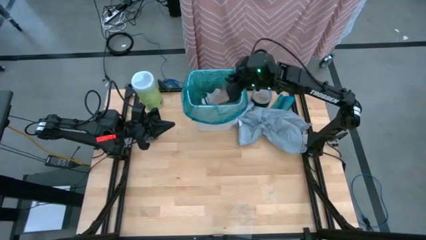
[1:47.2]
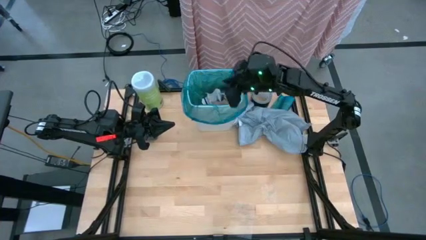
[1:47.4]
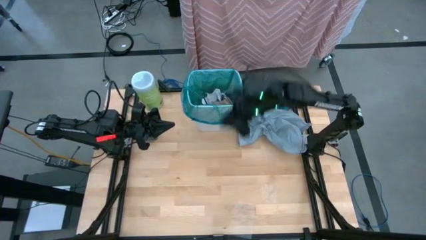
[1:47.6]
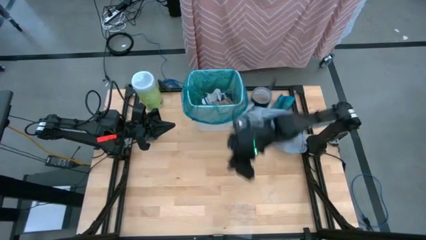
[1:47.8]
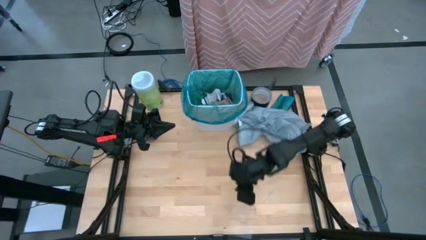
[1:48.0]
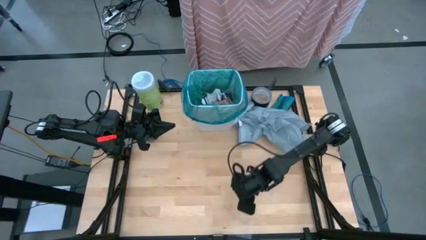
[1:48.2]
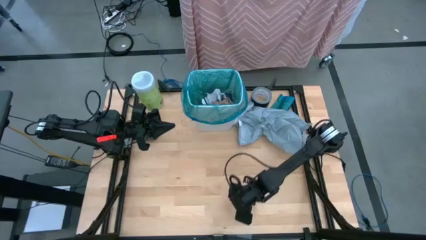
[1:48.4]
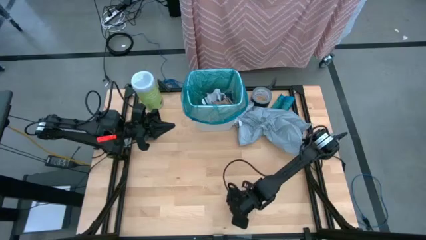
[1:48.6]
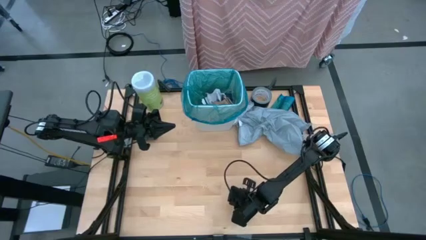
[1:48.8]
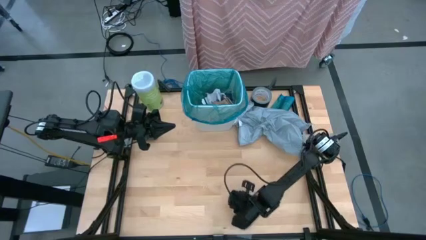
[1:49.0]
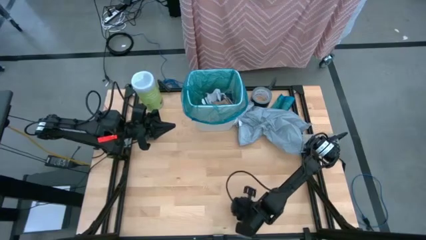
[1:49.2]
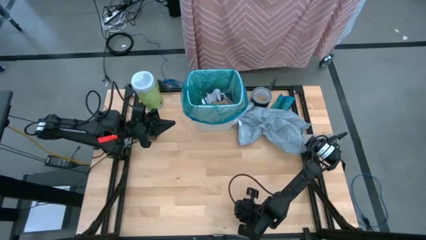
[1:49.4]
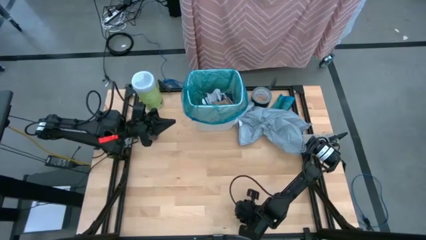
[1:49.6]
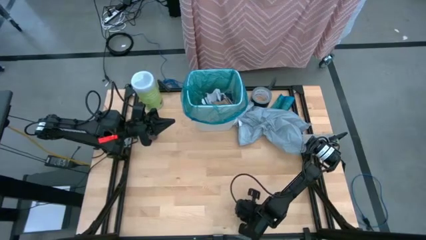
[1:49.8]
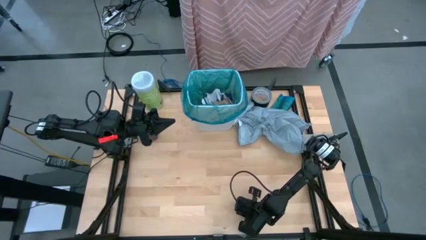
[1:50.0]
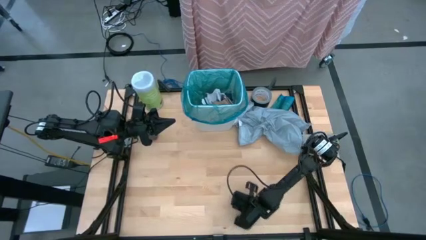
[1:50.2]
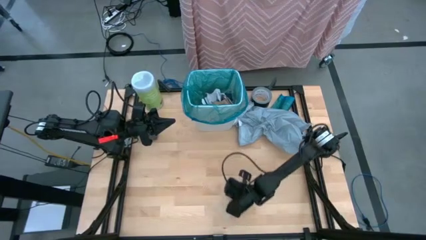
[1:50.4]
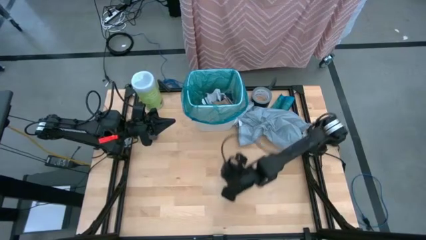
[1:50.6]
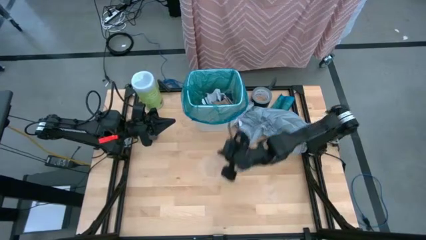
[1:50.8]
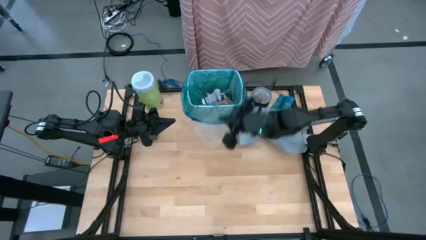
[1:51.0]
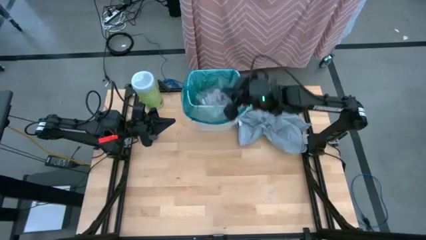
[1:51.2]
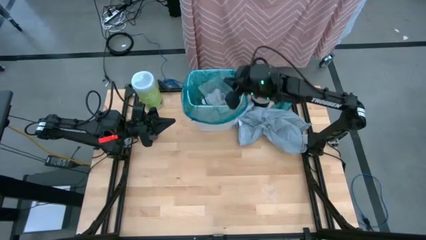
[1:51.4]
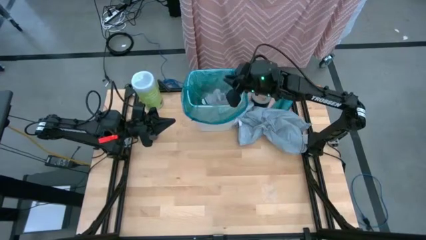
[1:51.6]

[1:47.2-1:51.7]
Task: place trash/remove bag and relplace
Put the transparent plastic material into the trash bin

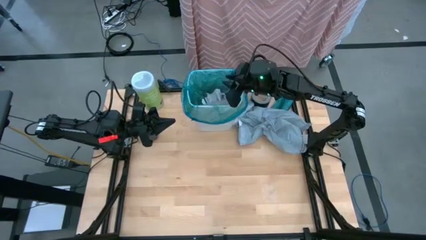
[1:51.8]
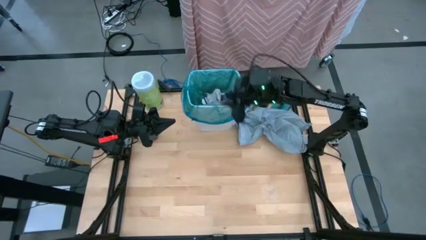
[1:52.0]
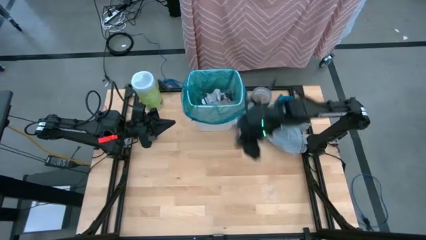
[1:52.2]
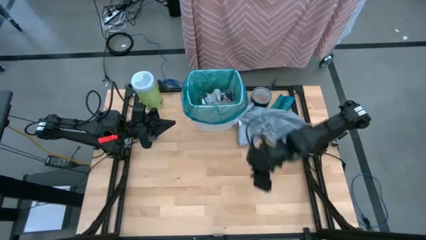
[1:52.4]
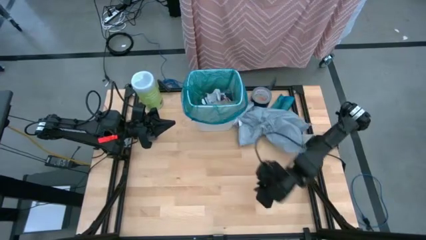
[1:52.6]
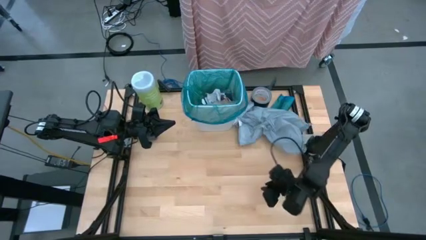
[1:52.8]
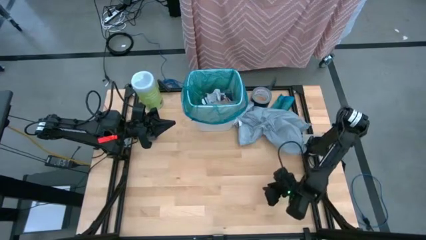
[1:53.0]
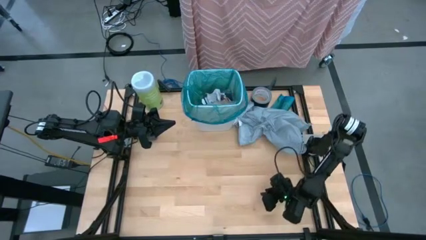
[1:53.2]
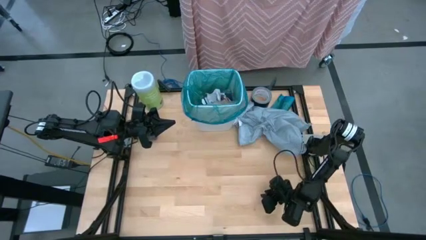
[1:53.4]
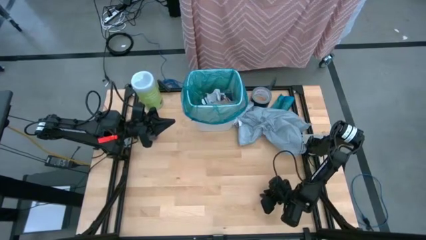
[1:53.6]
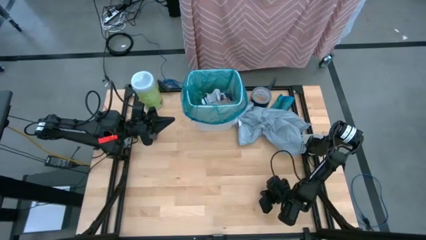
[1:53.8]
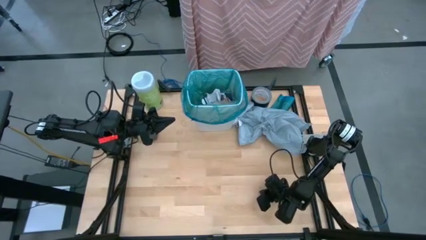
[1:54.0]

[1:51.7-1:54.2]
Put the transparent plastic material into the trash bin

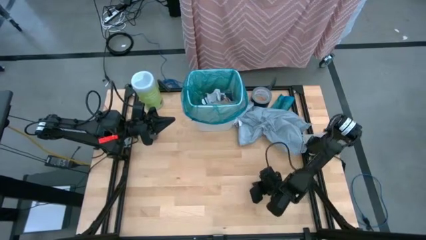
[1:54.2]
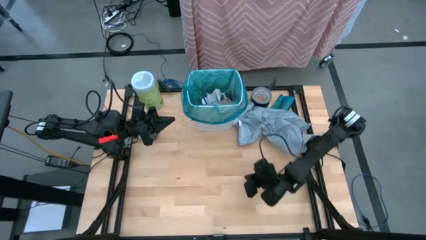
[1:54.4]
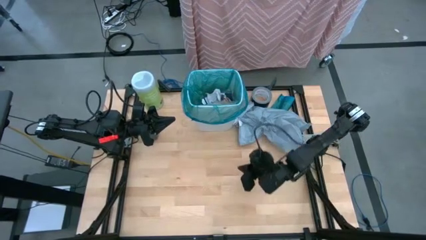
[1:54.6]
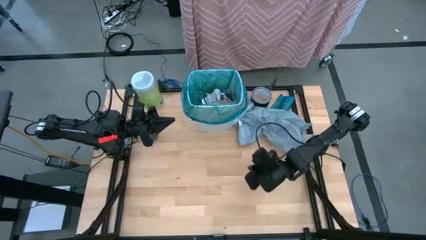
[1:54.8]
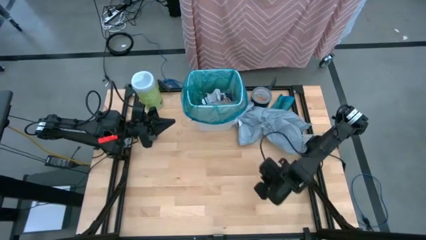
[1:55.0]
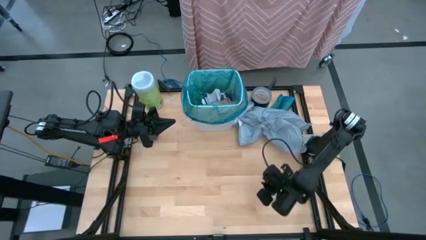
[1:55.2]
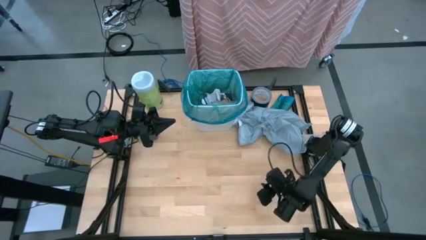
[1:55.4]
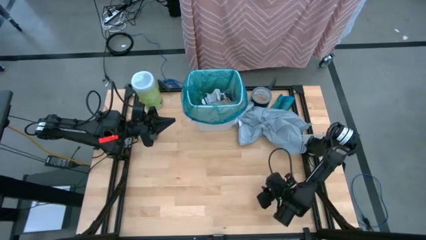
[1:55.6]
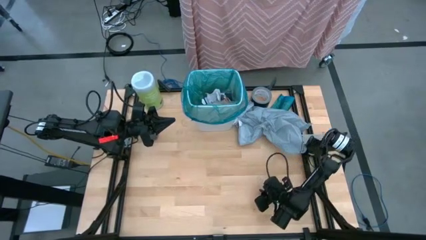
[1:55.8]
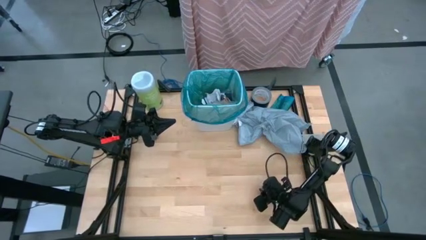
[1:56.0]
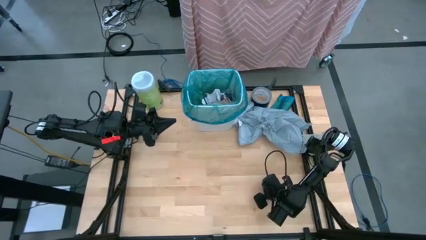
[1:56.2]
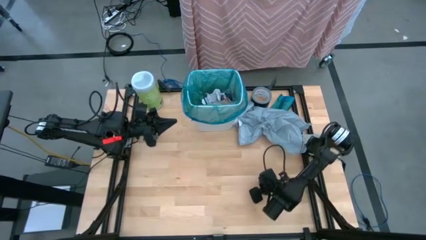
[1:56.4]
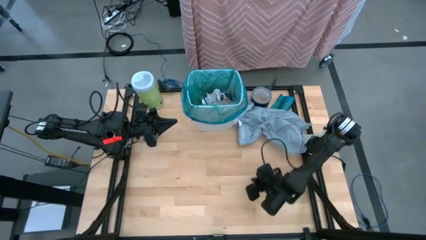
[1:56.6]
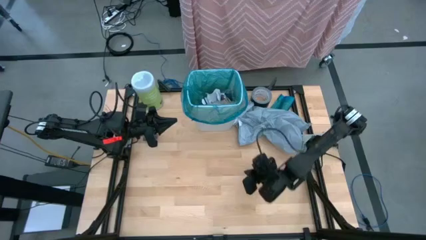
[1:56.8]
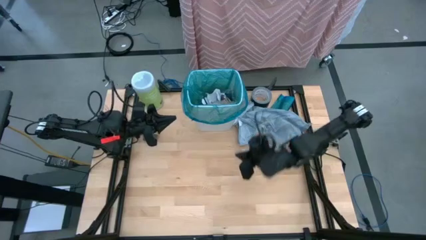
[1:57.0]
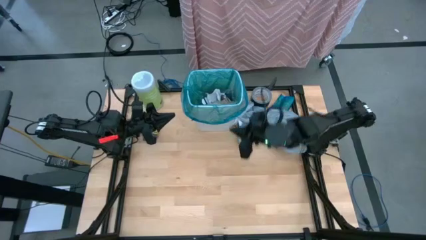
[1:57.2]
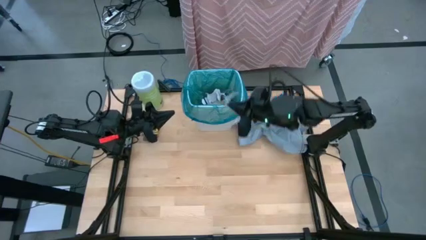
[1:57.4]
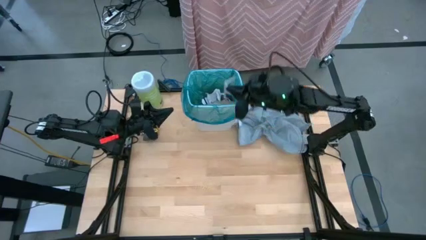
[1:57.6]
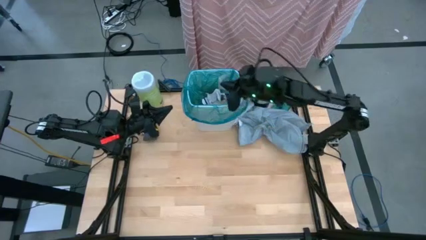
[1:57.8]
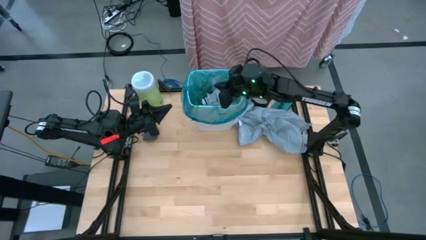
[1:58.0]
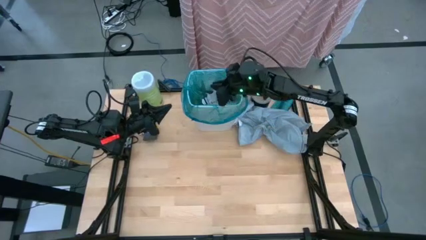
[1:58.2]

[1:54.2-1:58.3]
Put the transparent plastic material into the trash bin

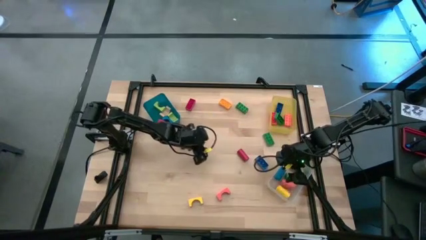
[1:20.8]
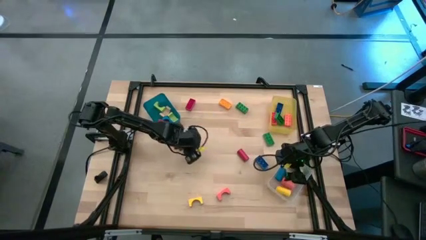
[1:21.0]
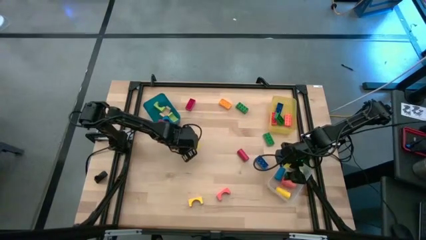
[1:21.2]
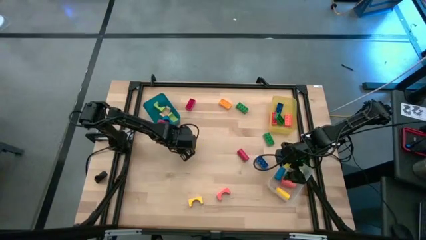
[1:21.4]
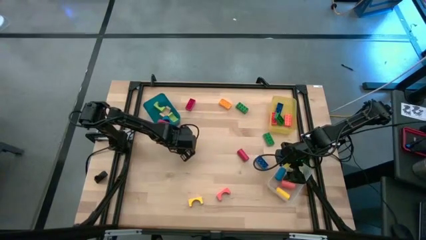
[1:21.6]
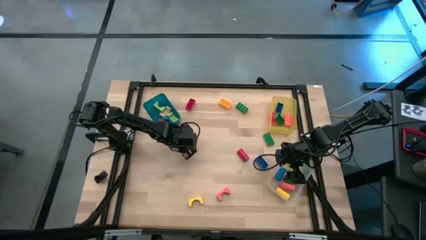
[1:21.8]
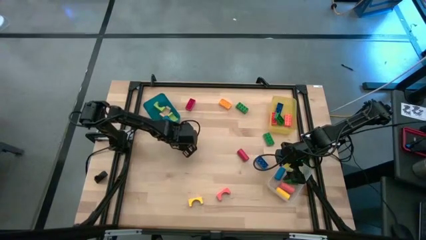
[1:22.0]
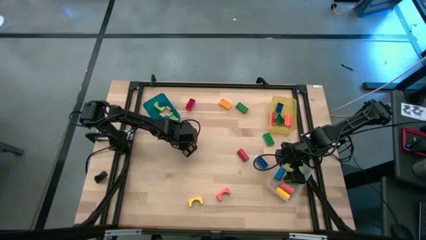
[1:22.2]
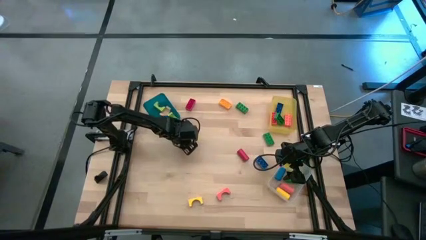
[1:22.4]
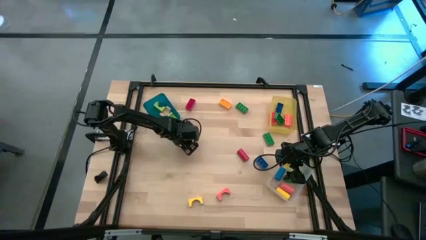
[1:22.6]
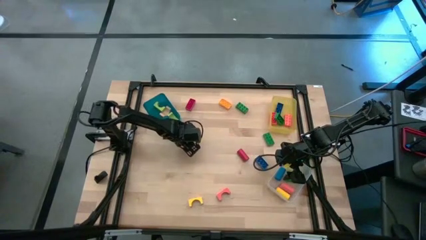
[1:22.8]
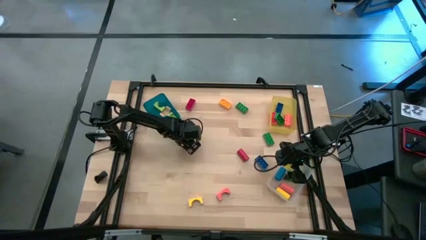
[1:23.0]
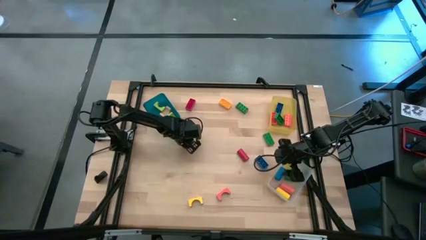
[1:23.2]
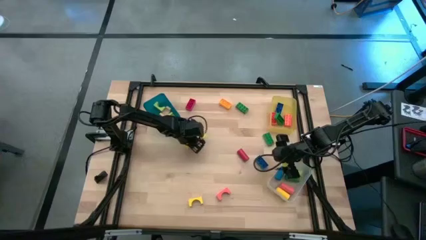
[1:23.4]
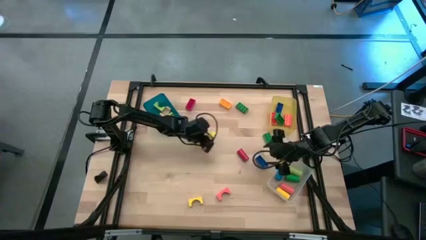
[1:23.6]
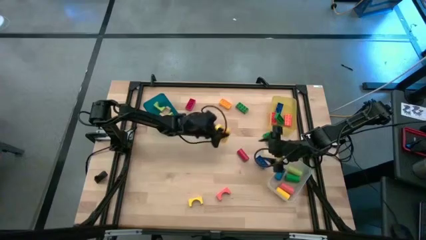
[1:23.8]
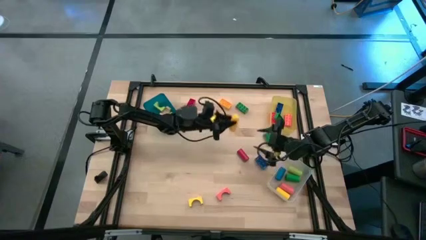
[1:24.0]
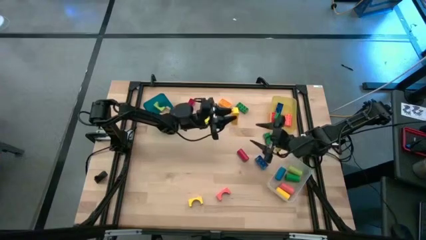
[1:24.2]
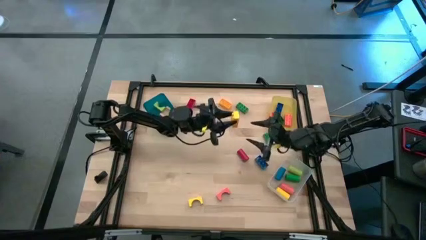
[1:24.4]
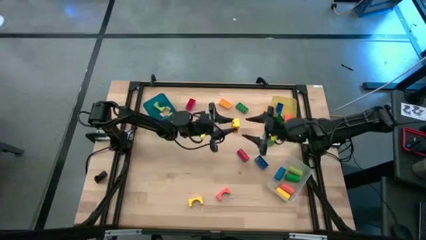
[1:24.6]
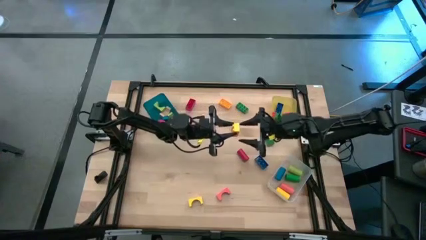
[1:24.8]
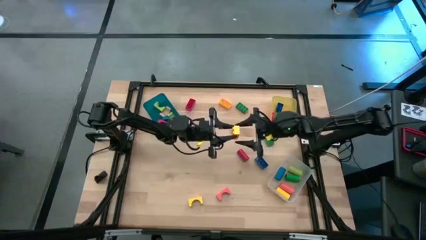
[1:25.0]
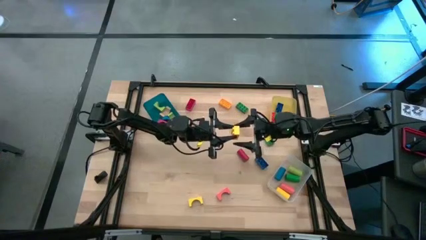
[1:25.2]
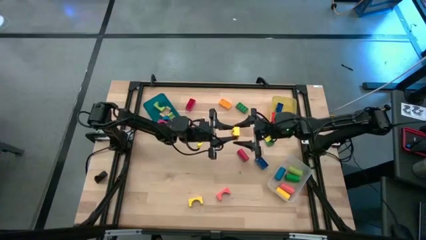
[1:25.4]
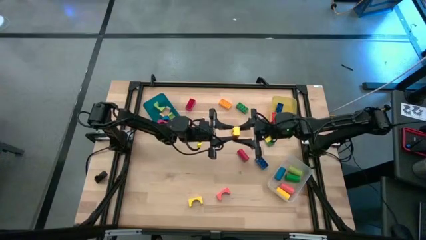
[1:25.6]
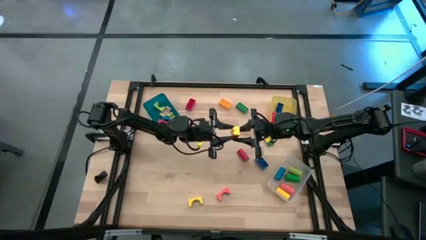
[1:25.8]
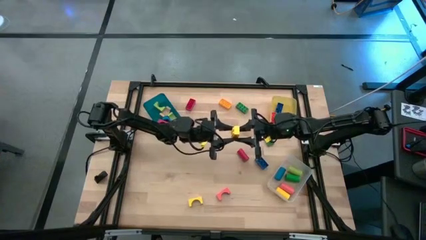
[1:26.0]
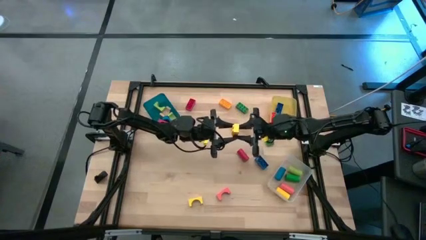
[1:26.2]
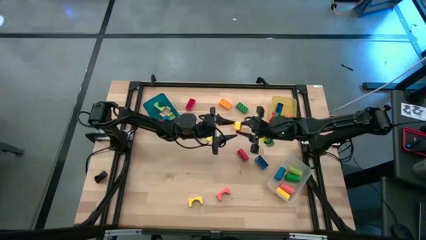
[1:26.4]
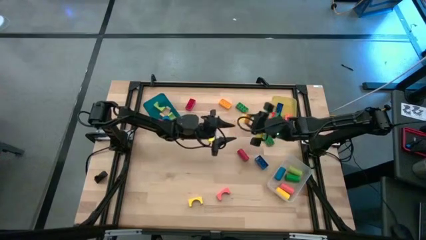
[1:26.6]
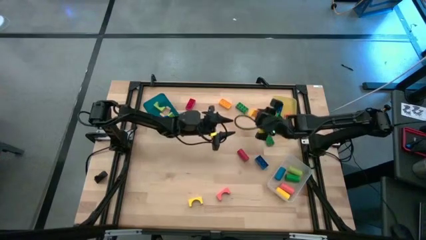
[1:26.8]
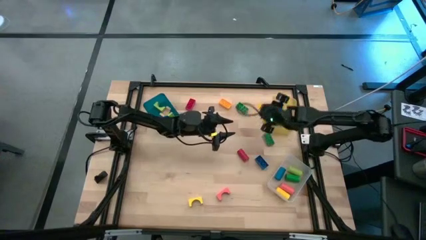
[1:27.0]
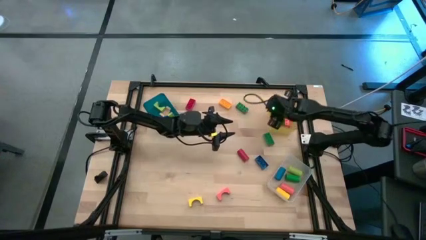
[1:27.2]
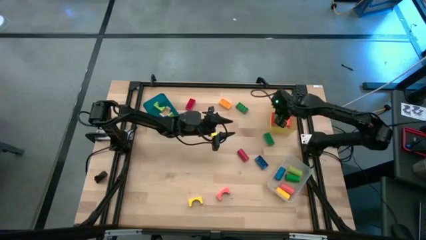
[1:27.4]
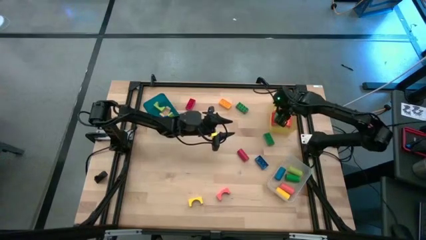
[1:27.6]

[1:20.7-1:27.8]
Task: Sort blocks by size
Put the yellow game piece into the yellow bin
